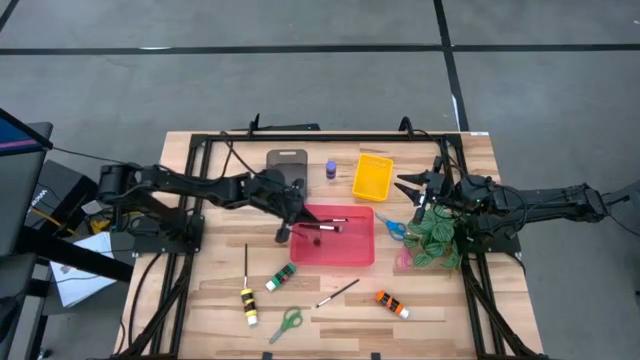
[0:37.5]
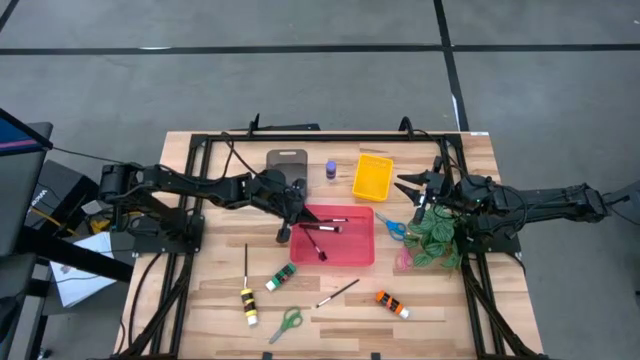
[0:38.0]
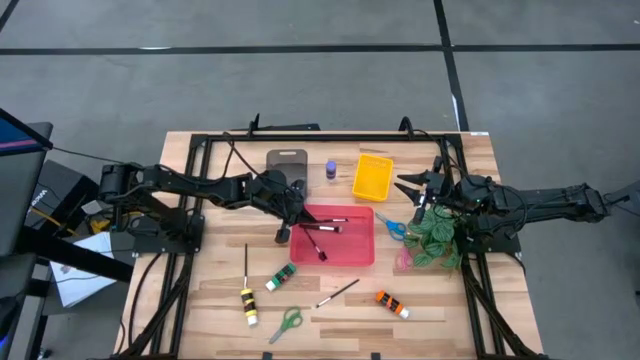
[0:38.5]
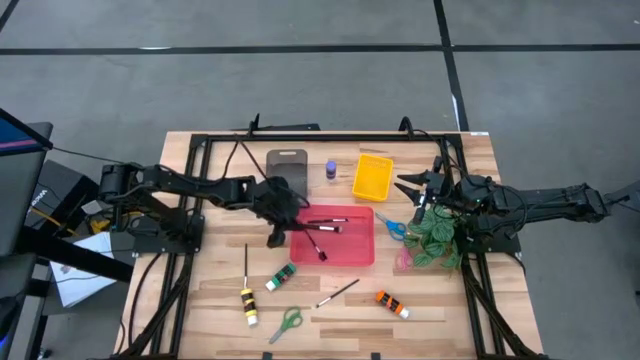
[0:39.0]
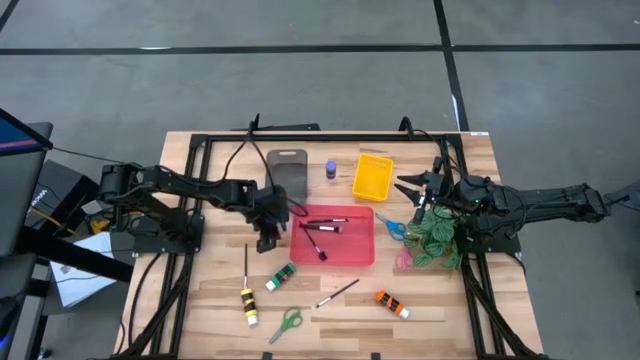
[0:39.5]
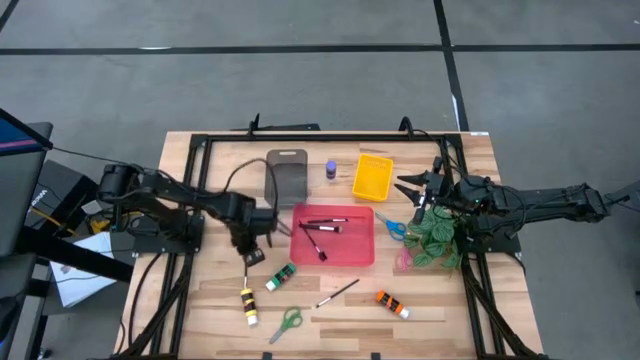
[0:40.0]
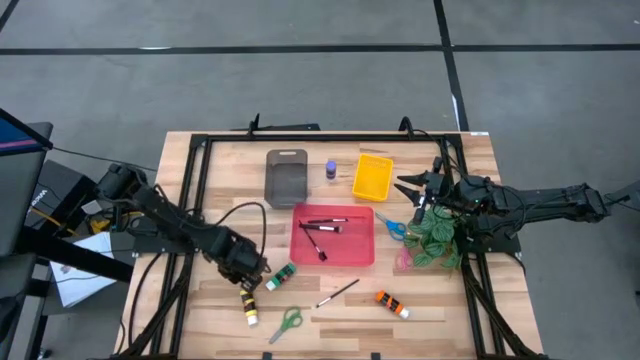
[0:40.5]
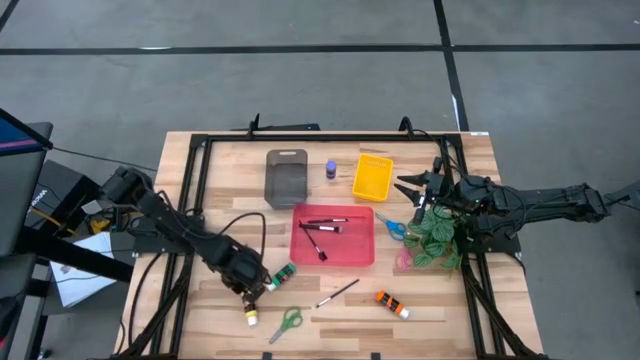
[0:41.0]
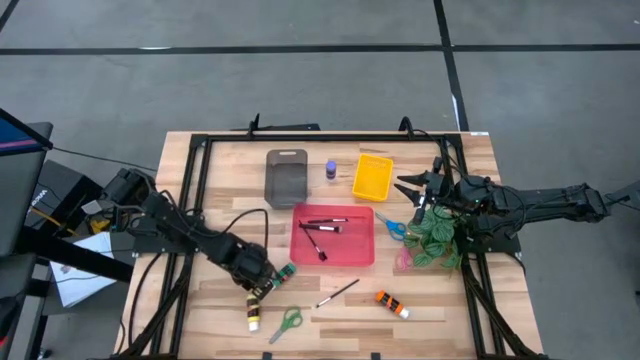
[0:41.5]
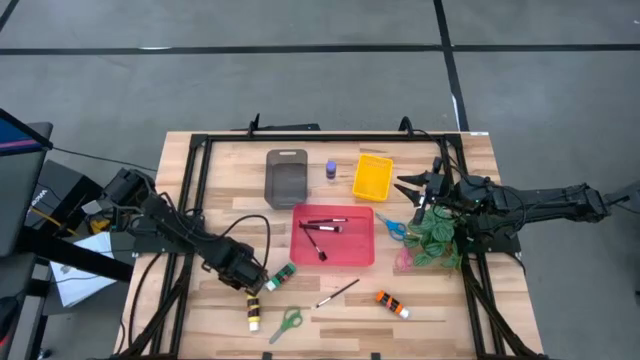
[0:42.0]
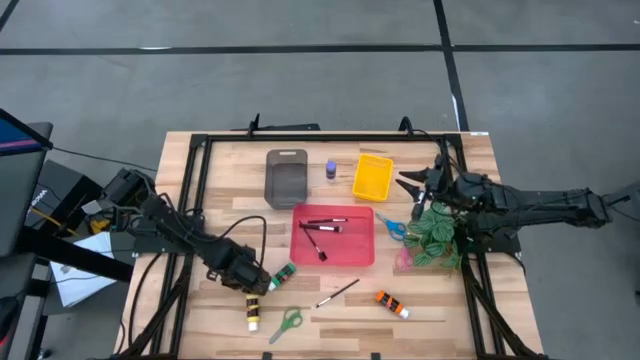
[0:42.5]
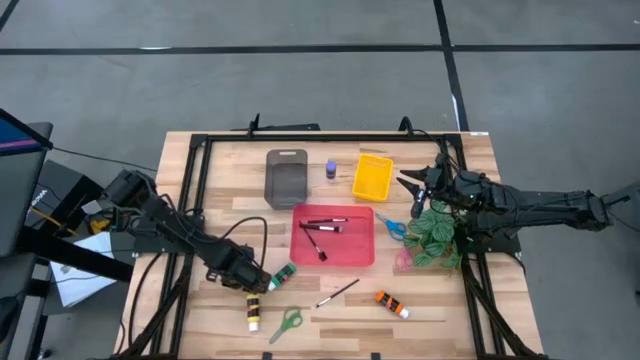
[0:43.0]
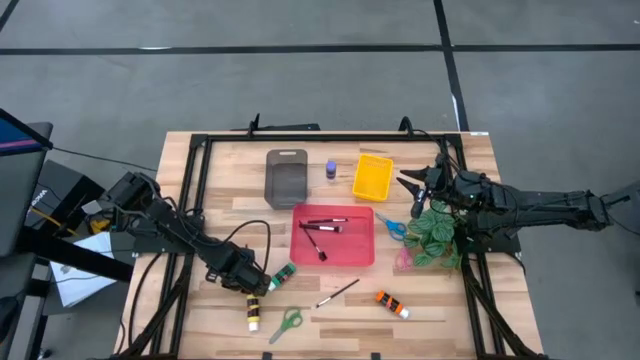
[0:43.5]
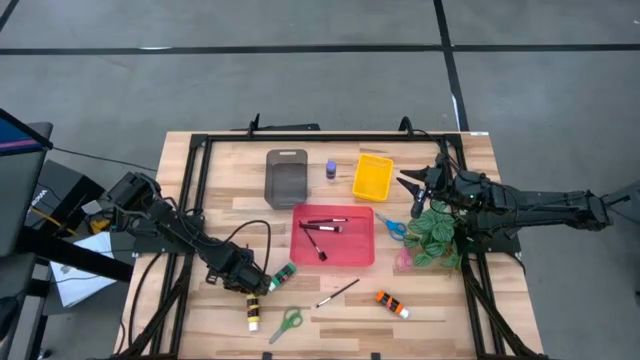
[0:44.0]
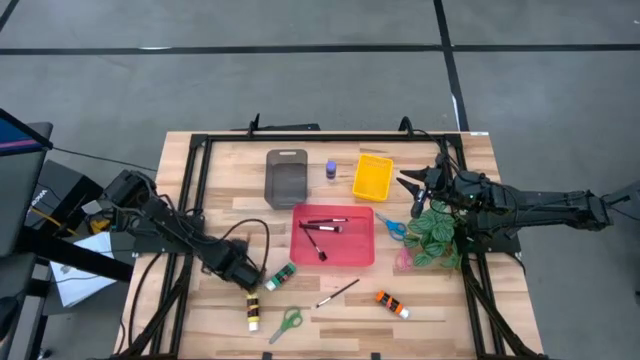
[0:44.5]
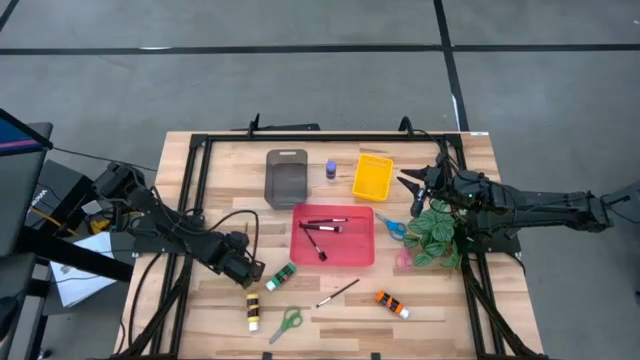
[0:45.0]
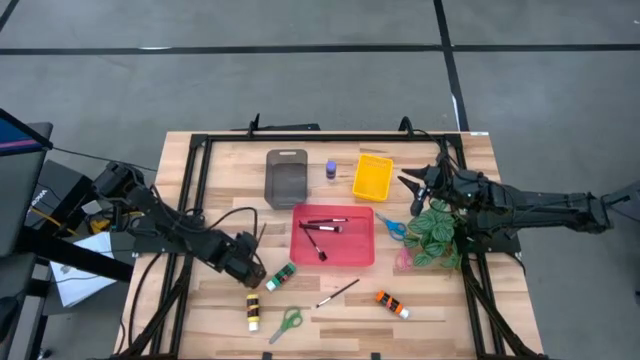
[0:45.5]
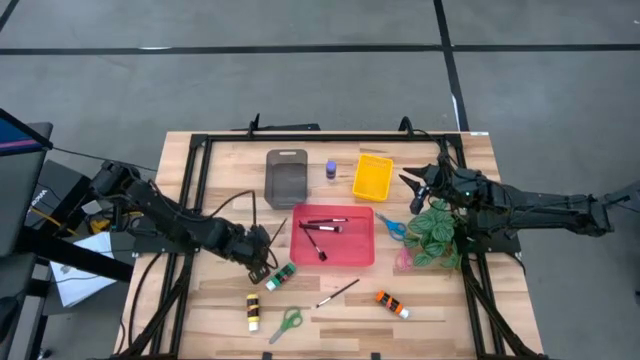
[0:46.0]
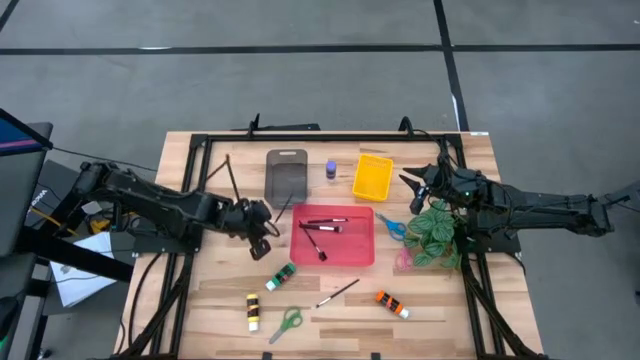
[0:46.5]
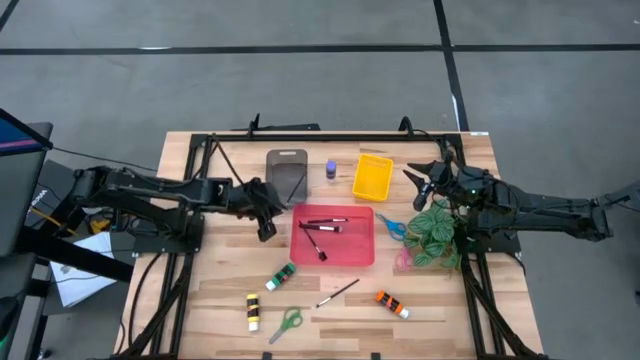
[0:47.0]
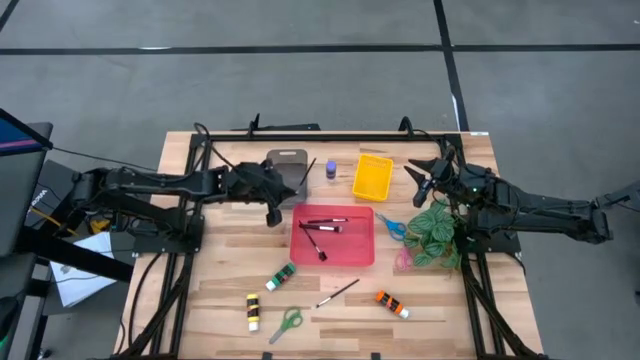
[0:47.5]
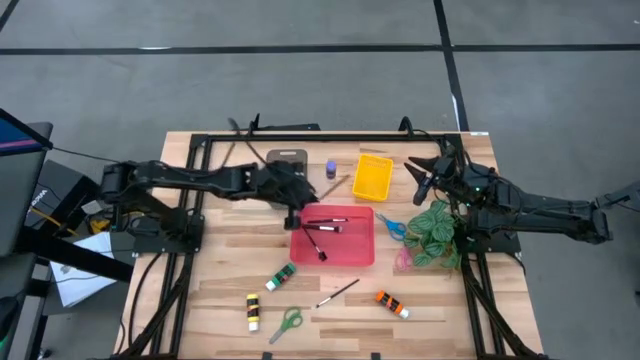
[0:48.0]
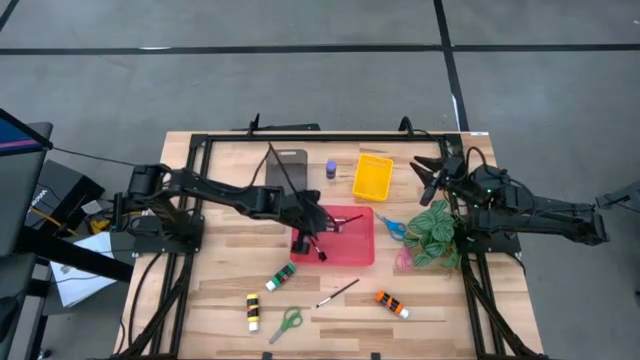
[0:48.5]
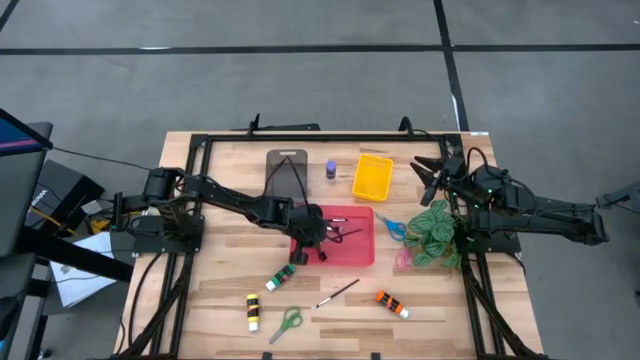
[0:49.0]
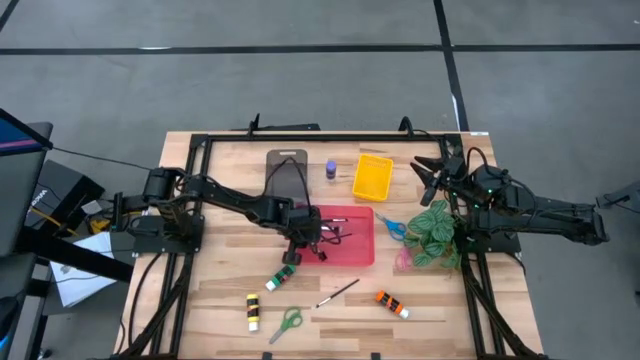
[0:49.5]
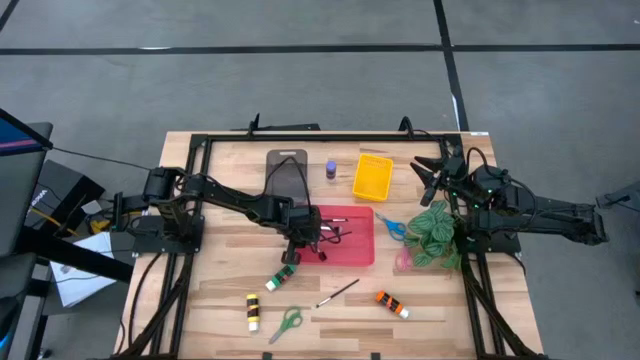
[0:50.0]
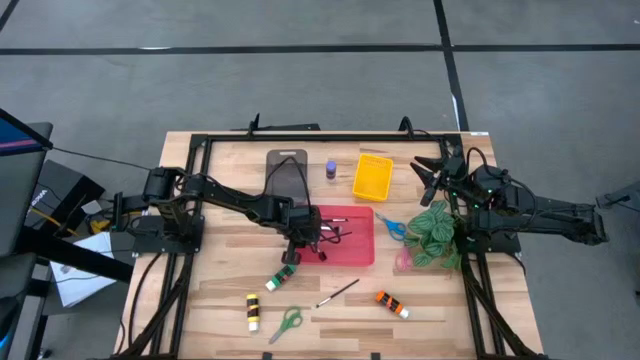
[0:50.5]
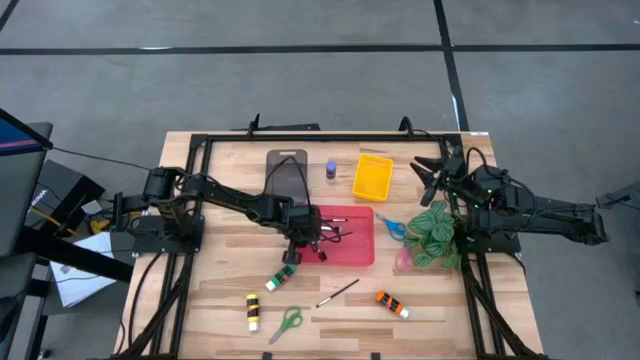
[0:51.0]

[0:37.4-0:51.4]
Task: Pick & Place Paint Supplies
Put the black makeup brush into the red bin

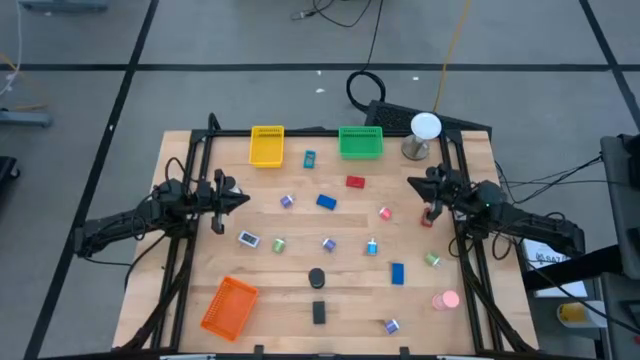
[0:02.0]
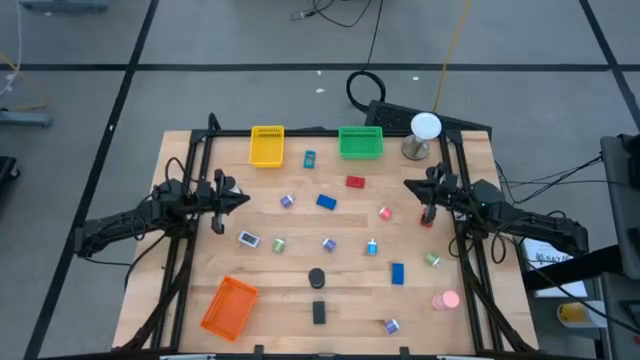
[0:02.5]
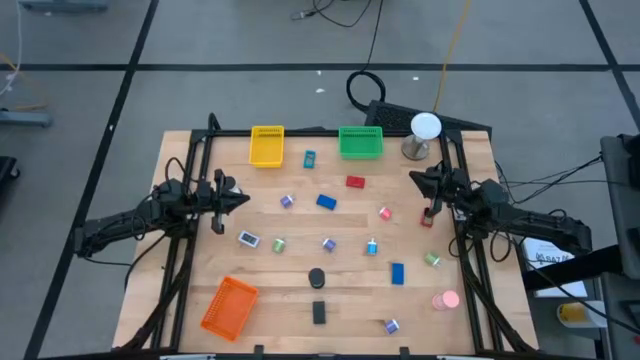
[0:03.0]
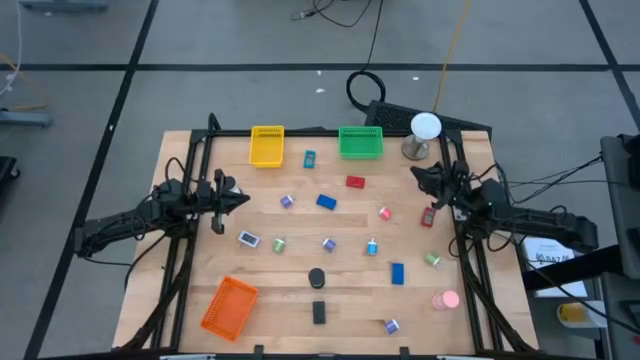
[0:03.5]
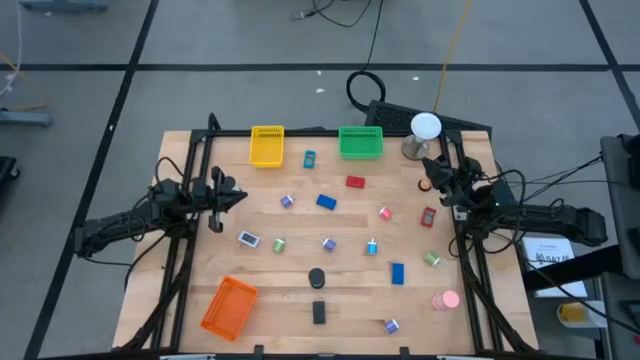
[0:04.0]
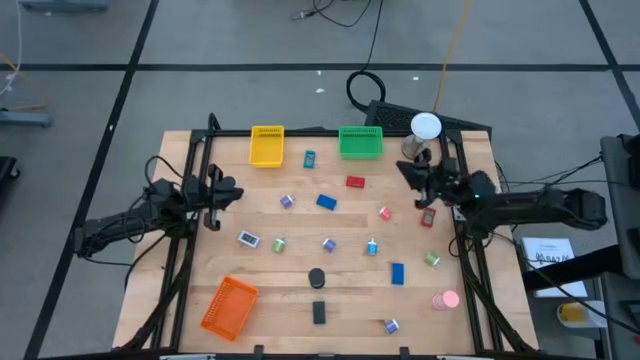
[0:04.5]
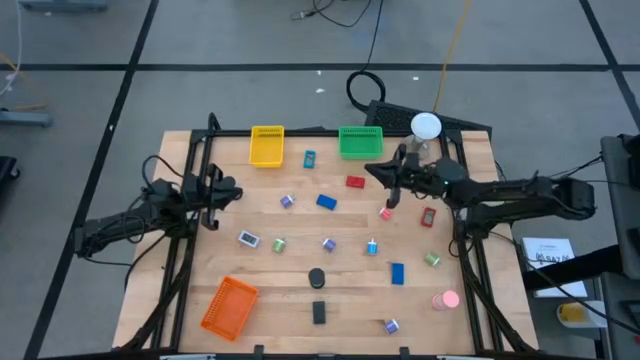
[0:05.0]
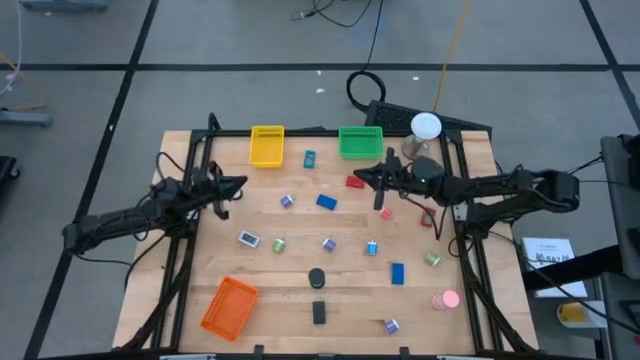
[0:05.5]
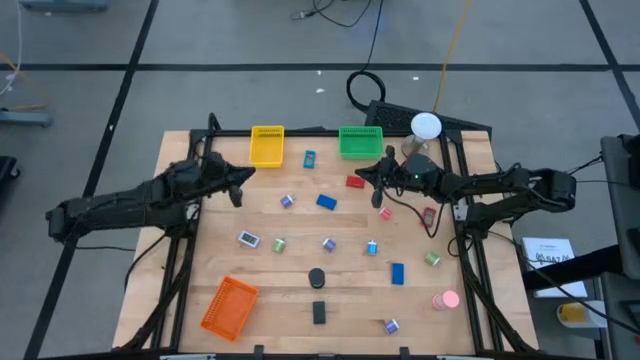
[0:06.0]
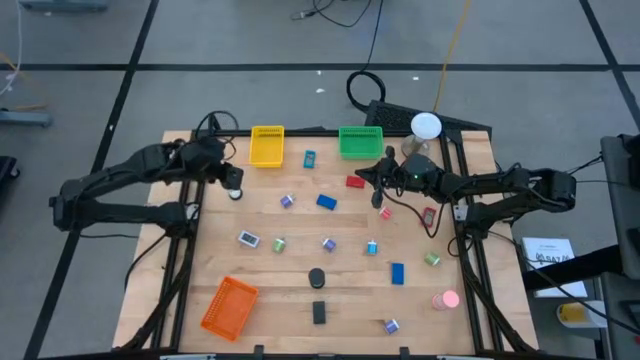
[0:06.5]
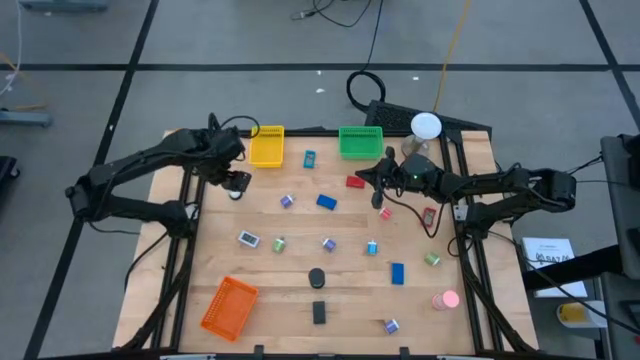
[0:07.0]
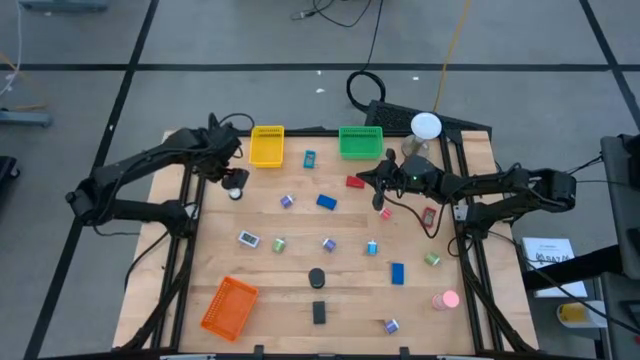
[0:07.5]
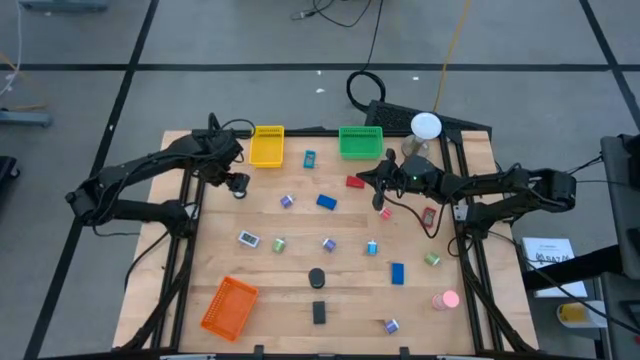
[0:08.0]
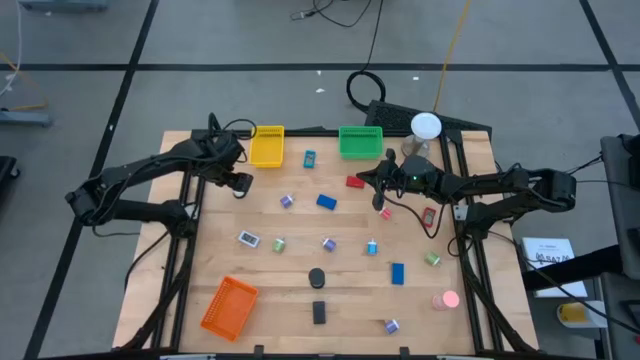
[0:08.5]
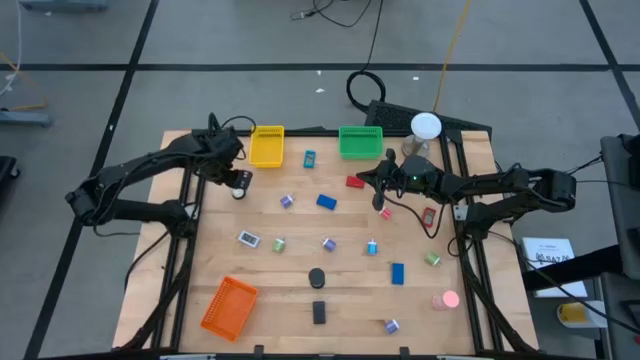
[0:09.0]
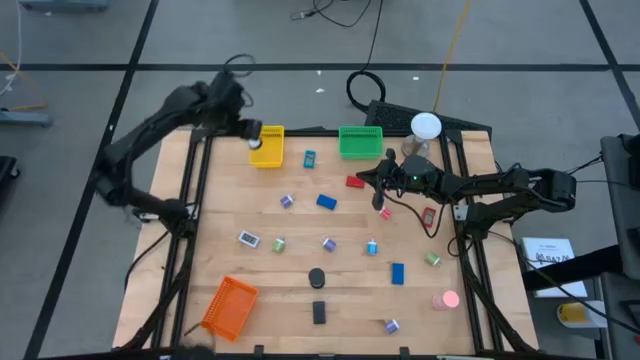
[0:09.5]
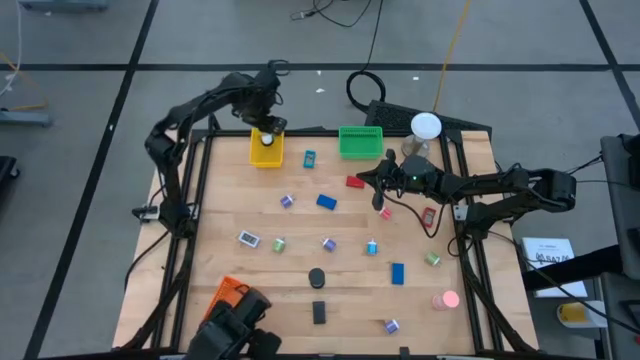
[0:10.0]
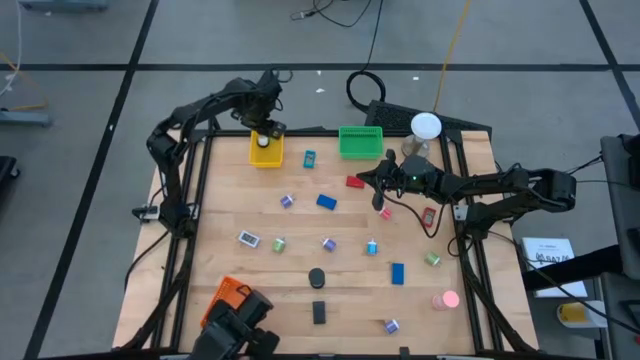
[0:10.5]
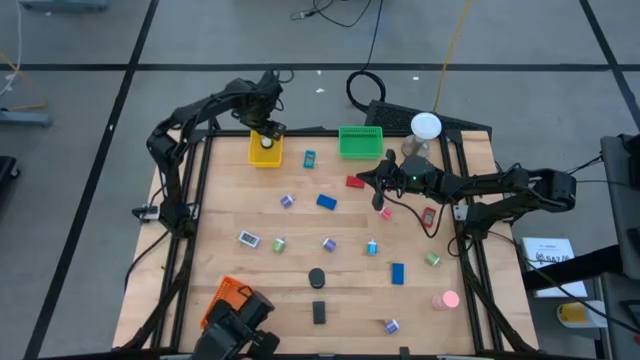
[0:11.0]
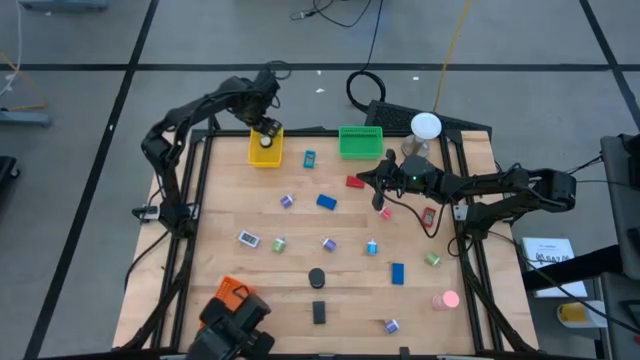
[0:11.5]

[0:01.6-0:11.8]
Task: Pick & Place Office items
Put the white hourglass into the yellow bin
